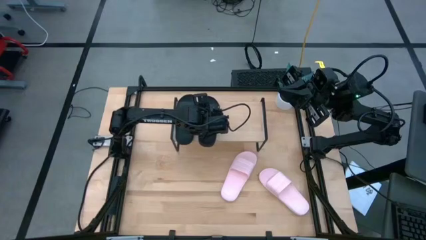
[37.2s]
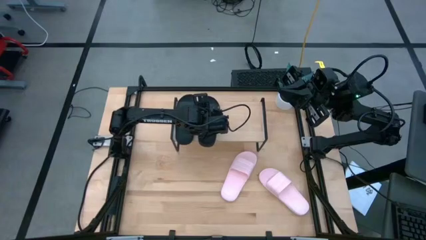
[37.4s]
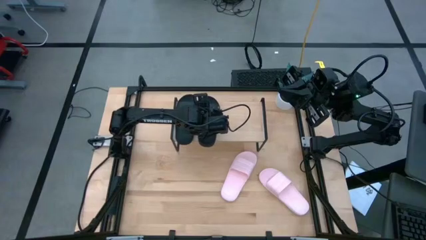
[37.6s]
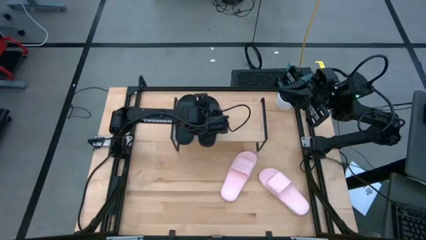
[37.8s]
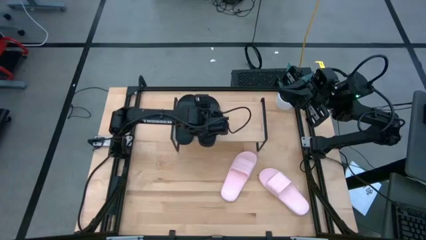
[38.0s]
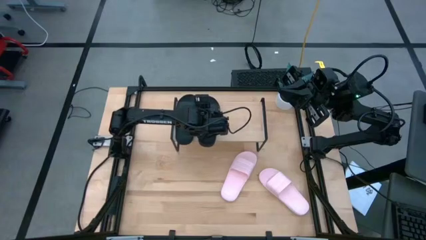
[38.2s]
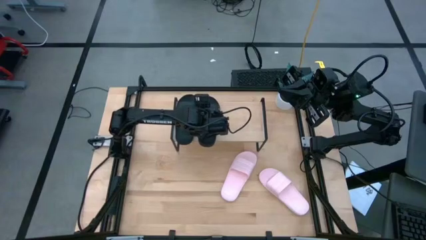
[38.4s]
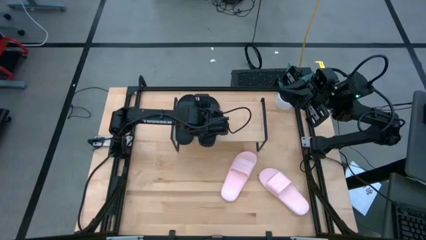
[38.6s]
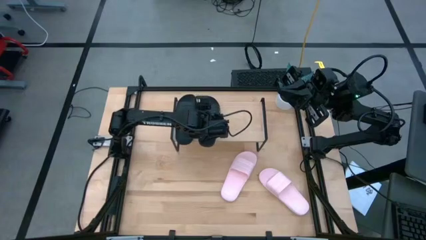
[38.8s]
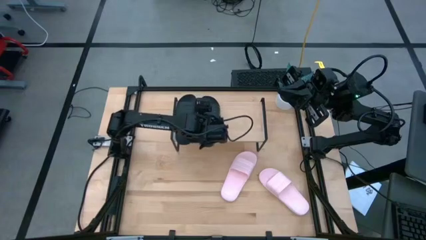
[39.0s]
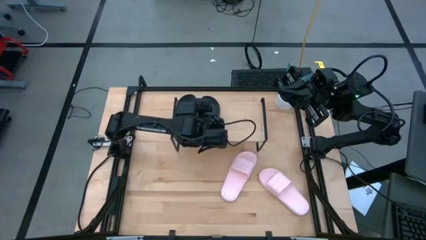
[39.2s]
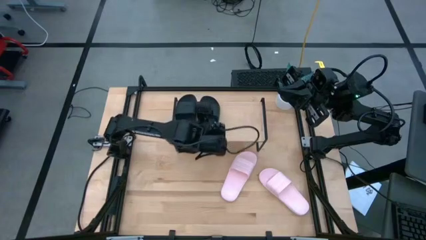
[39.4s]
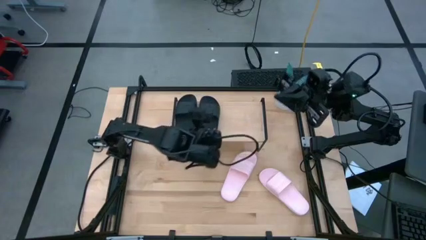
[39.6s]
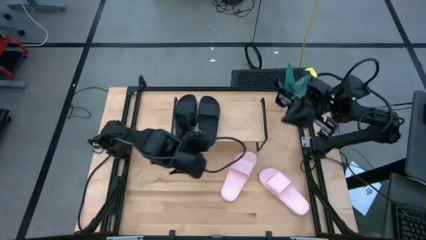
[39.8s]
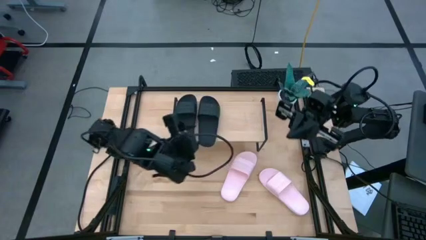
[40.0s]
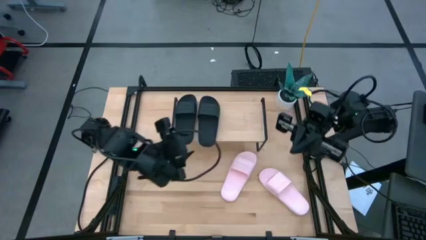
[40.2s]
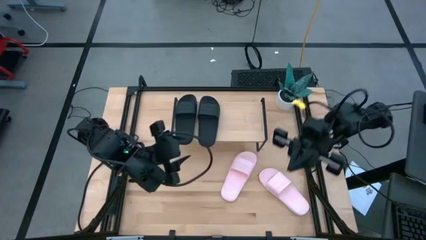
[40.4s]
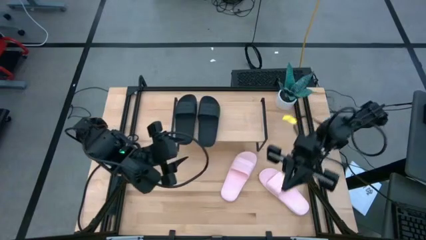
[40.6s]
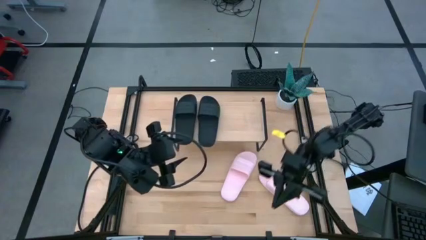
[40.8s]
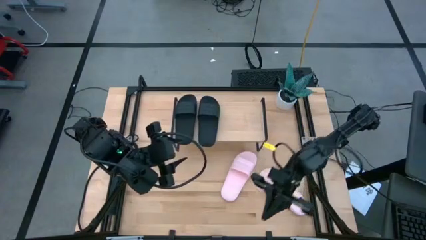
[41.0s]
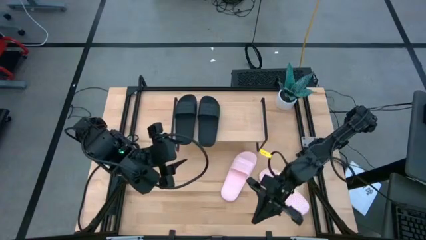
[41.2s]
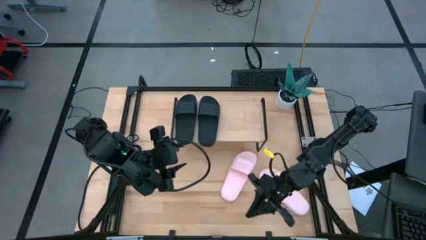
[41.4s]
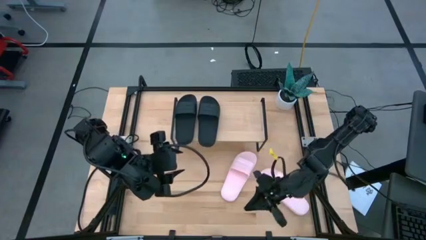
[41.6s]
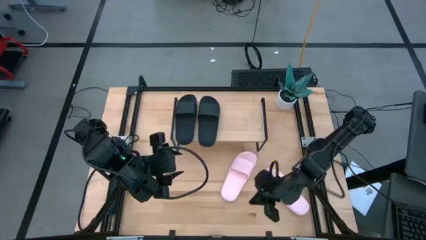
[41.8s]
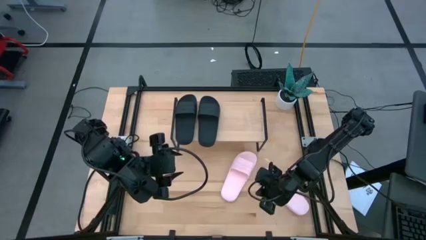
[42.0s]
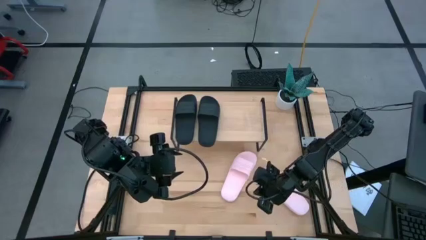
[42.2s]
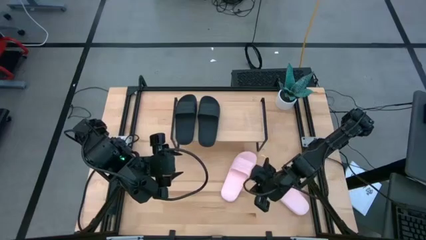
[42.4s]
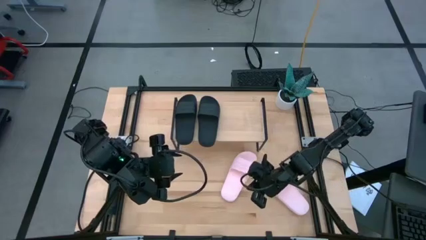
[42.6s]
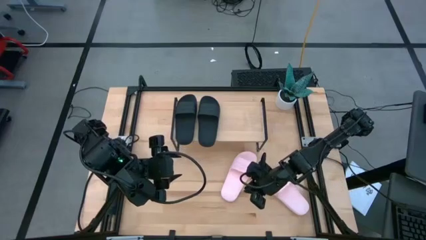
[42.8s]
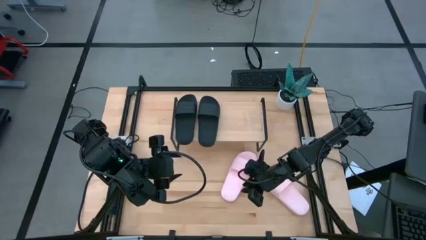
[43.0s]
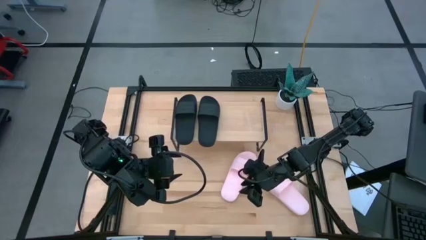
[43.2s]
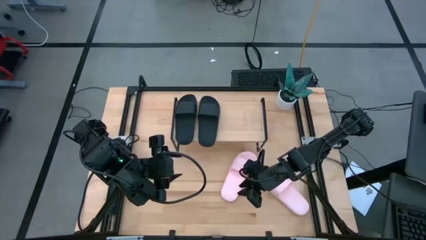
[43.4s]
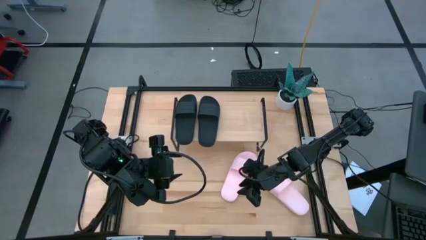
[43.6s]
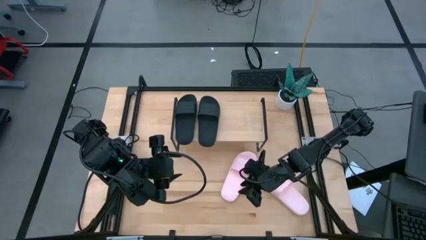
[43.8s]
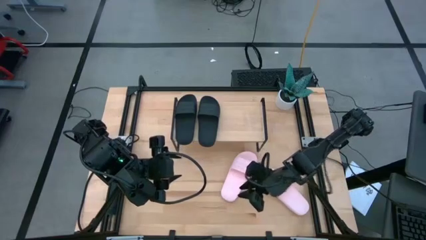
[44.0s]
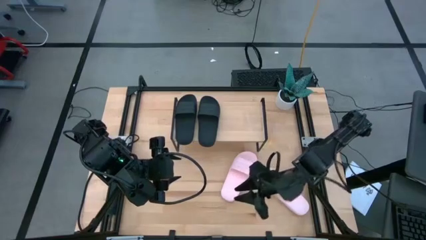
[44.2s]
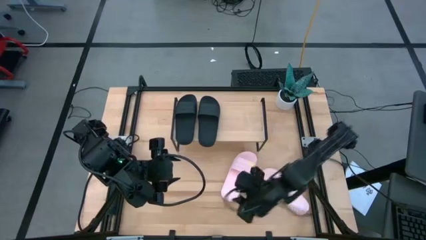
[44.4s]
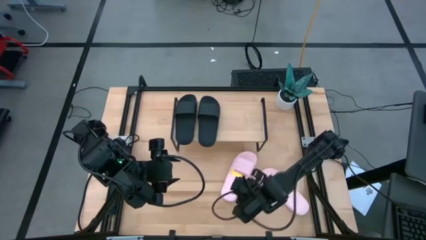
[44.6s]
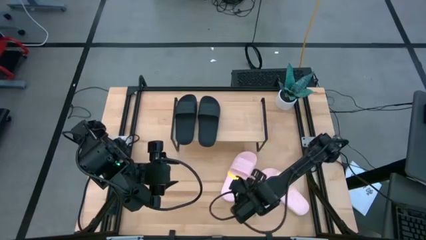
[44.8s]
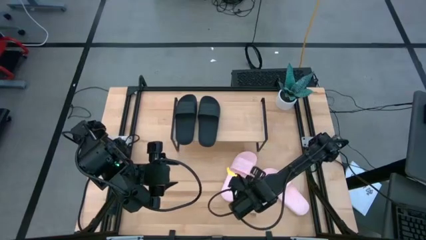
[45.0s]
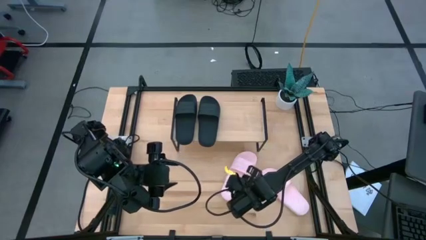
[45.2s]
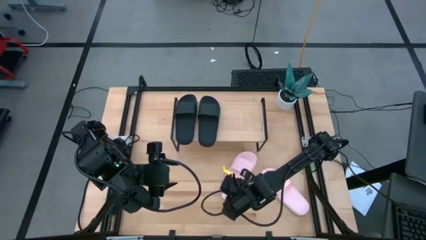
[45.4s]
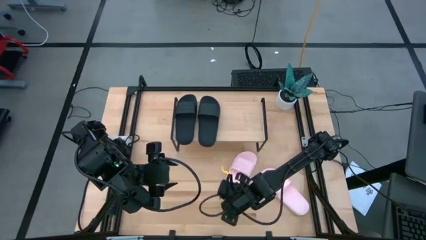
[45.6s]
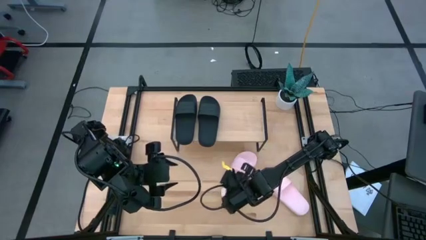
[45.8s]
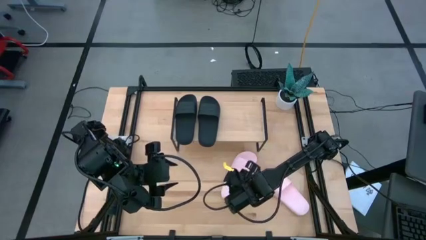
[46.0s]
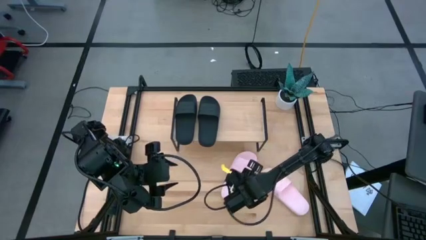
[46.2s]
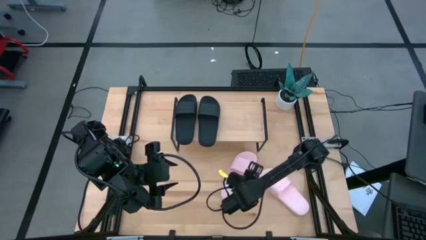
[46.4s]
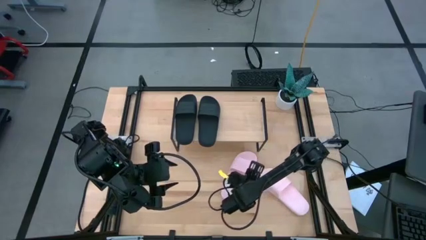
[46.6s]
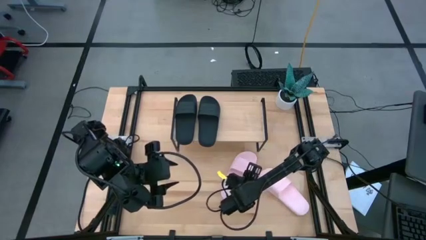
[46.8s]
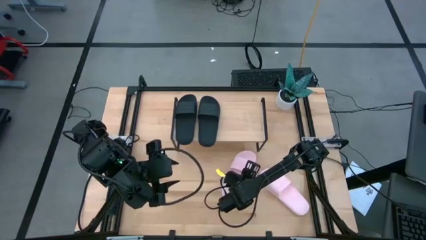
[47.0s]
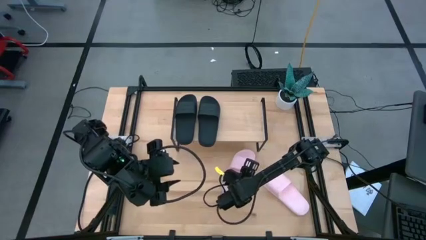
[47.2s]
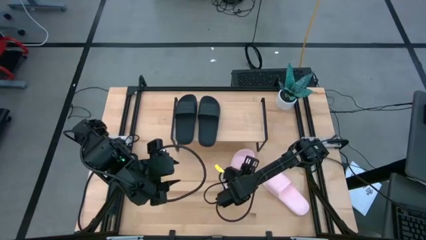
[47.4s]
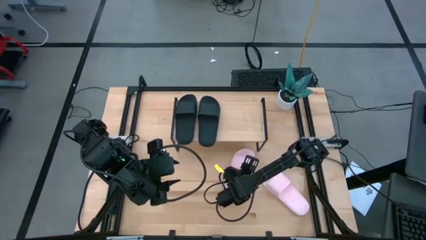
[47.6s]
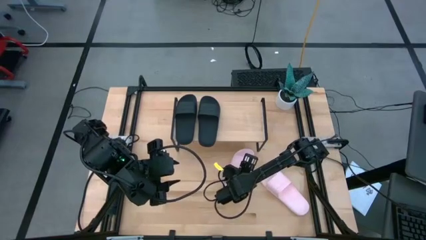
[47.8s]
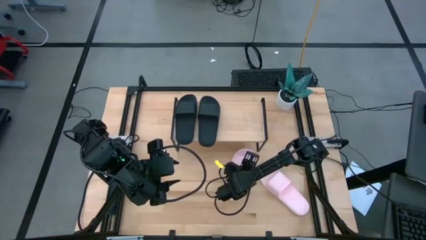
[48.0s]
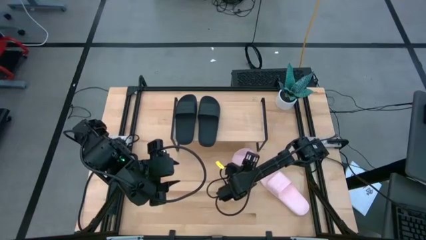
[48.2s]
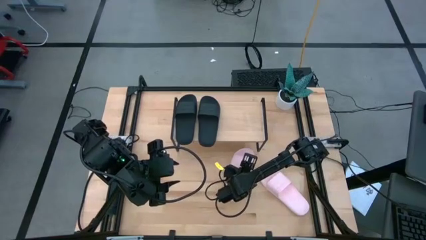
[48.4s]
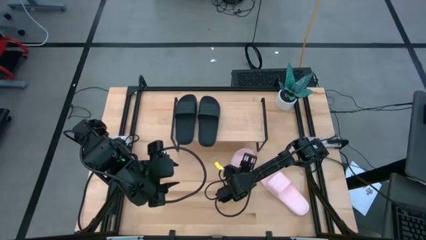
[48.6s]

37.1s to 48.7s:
Task: Pick and place slides into the shelf
Put the left pink slide next to the black slide on the shelf
